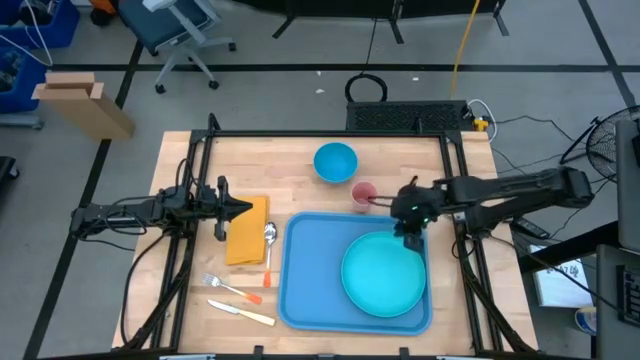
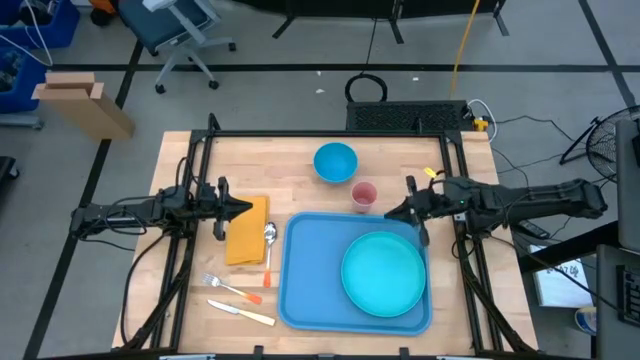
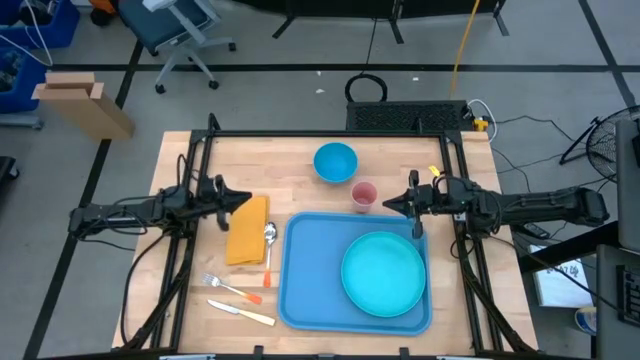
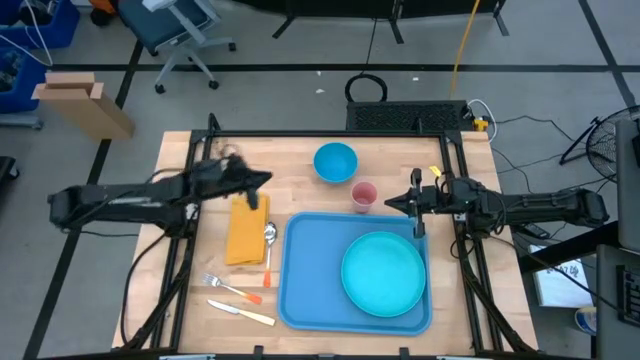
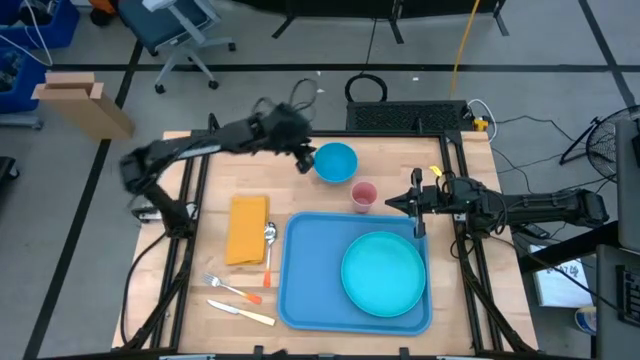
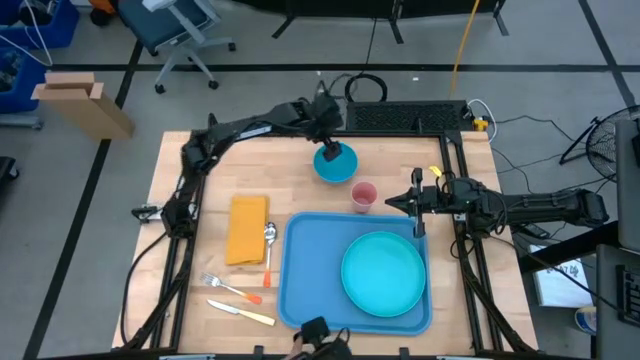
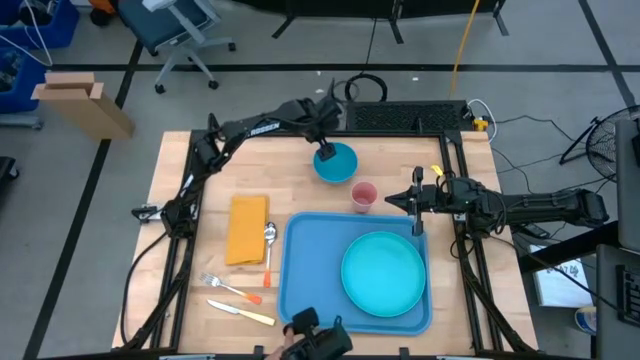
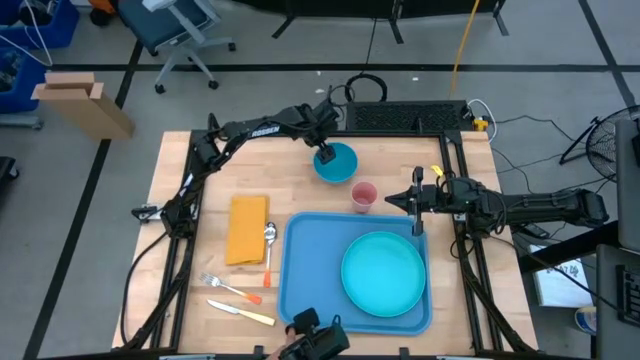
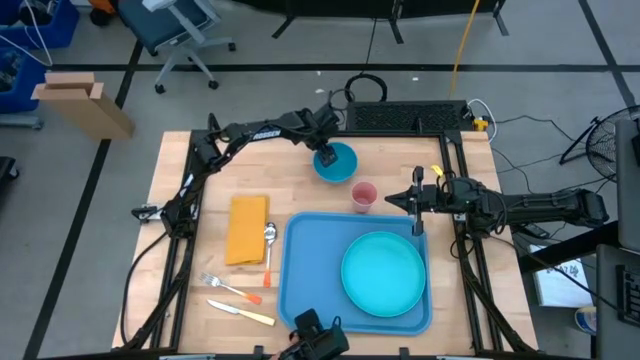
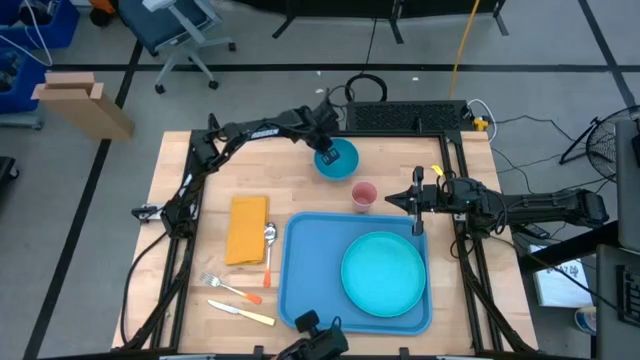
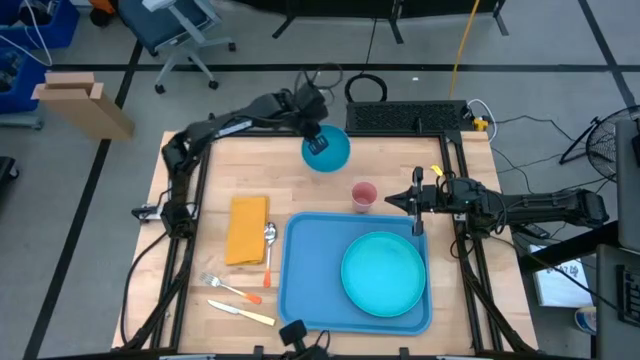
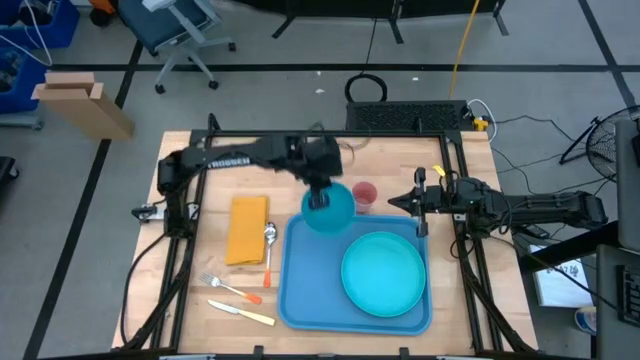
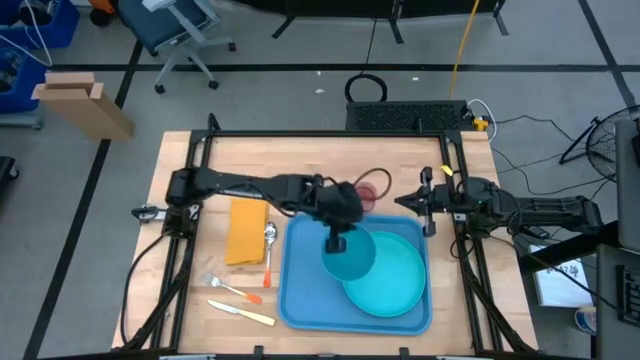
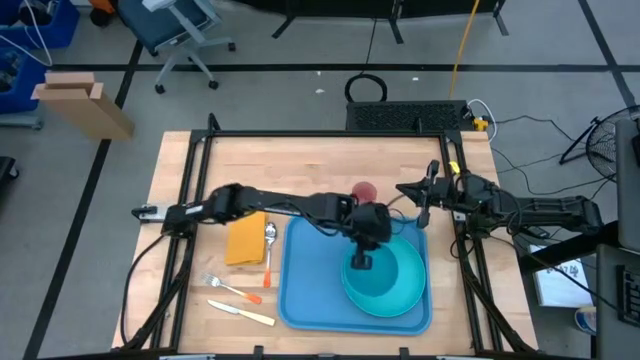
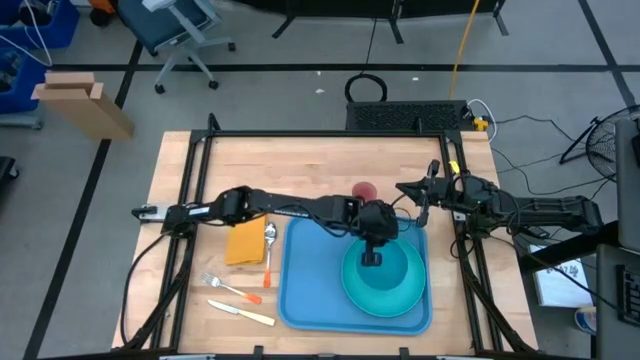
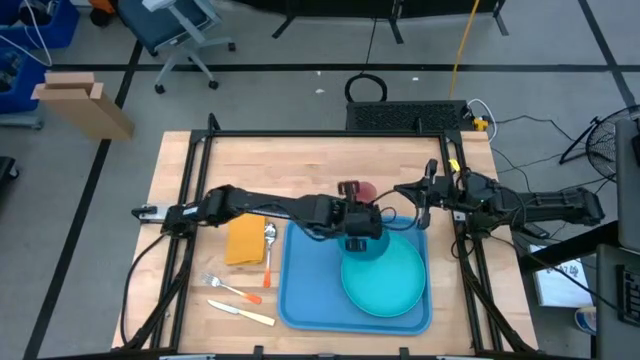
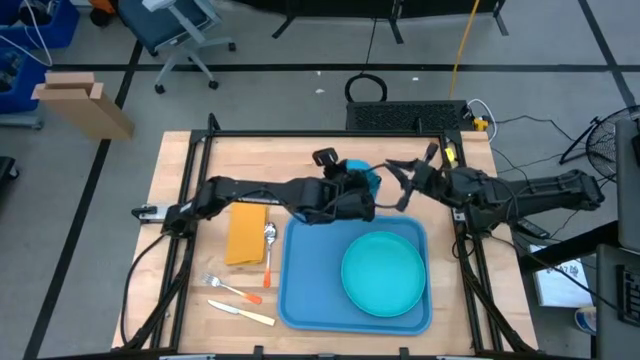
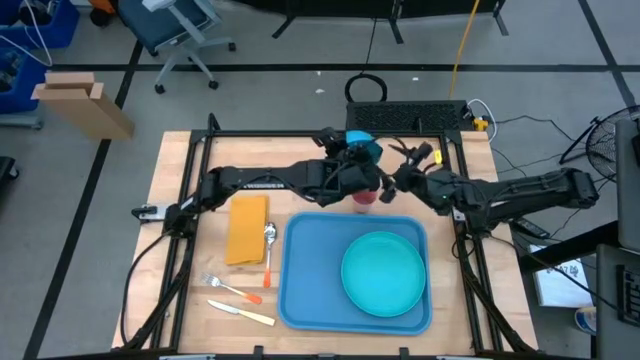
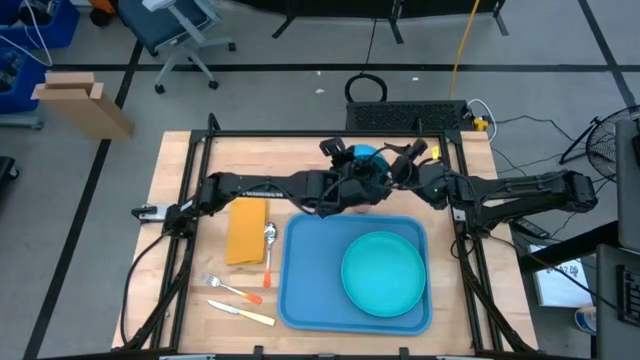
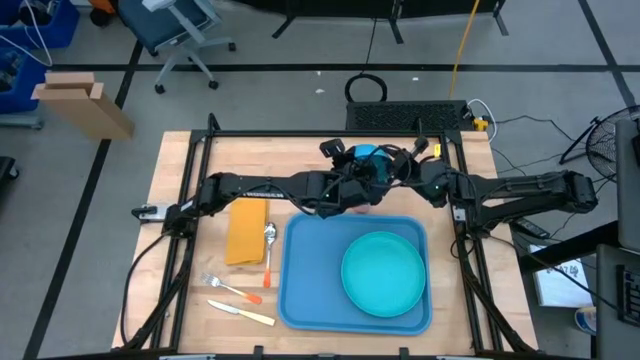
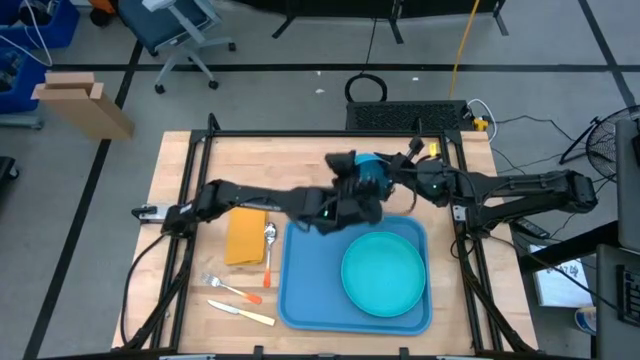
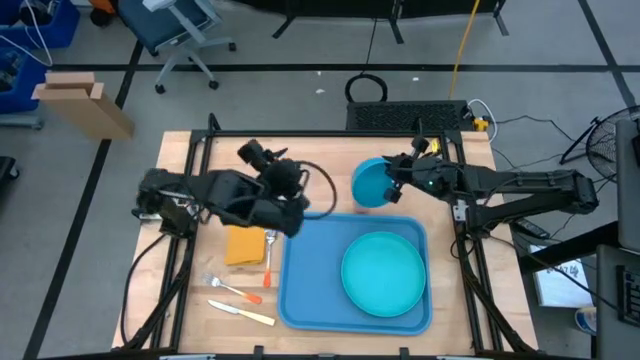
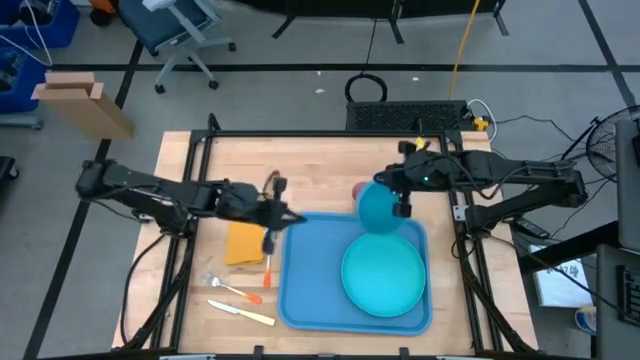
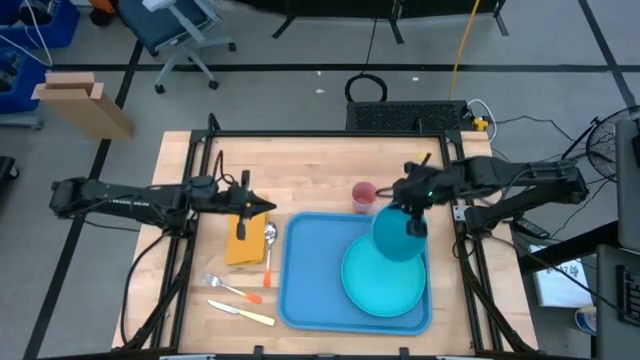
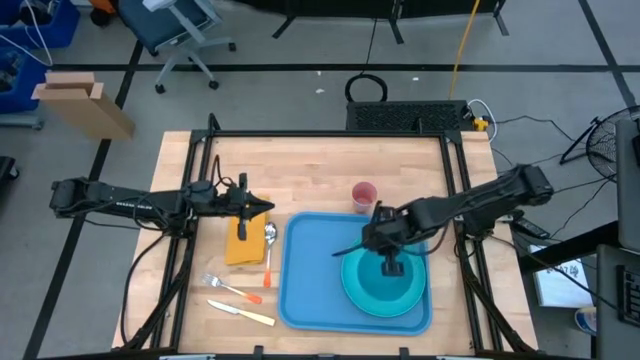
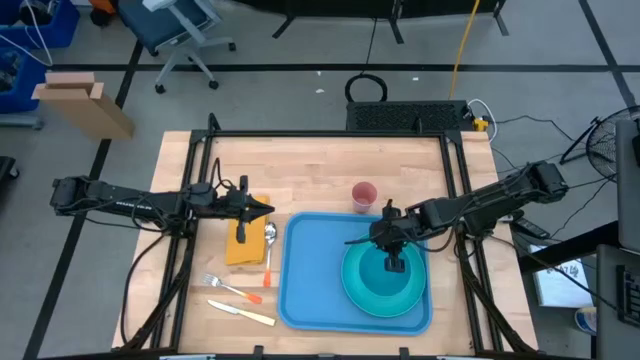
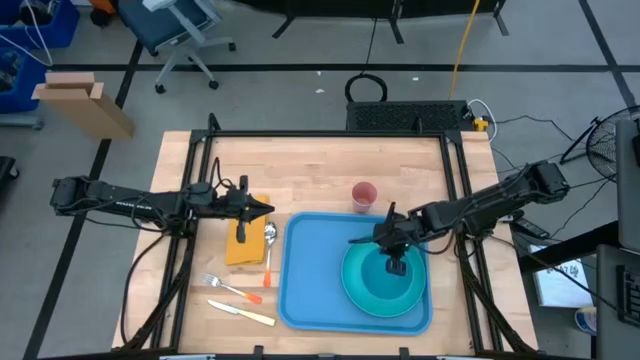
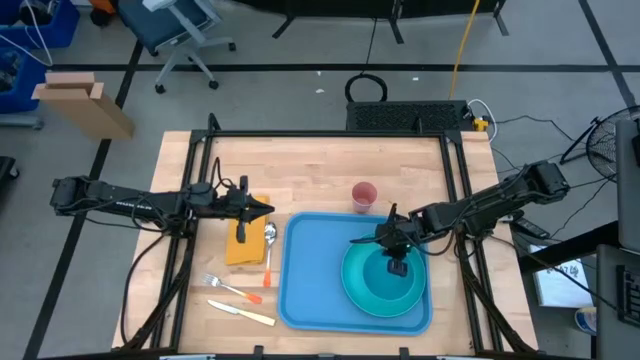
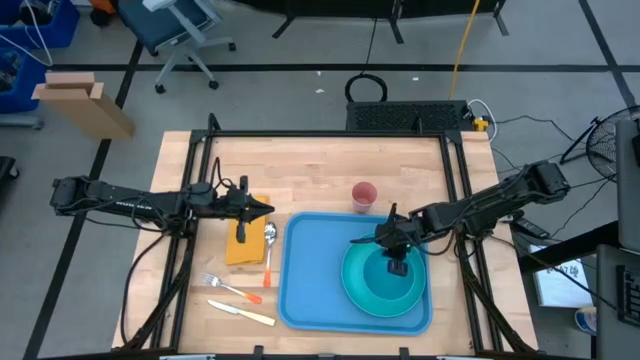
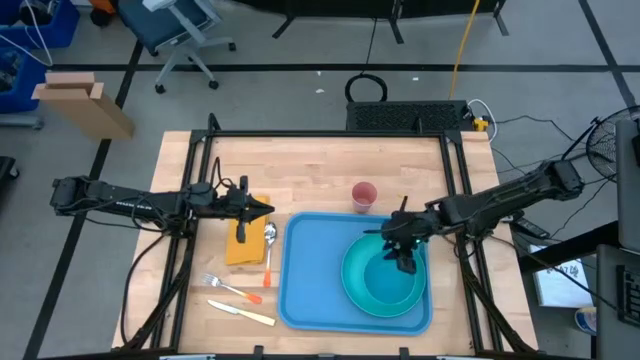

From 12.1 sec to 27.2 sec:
Task: Set up tray
Put the light blue bowl on the light green plate

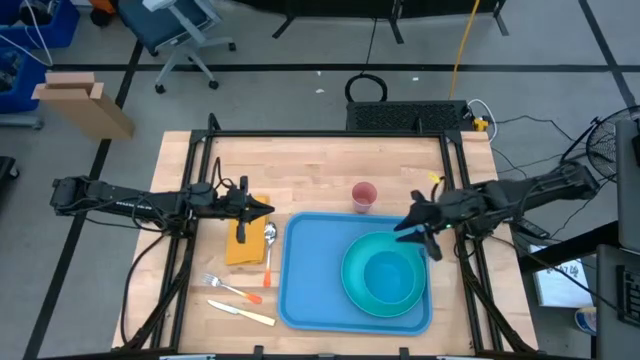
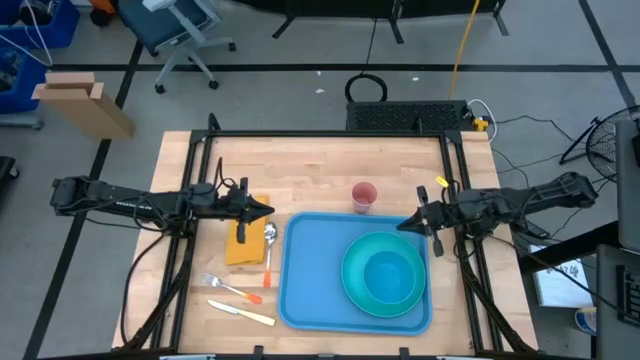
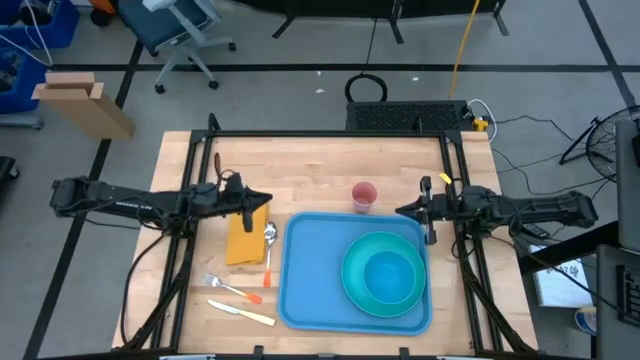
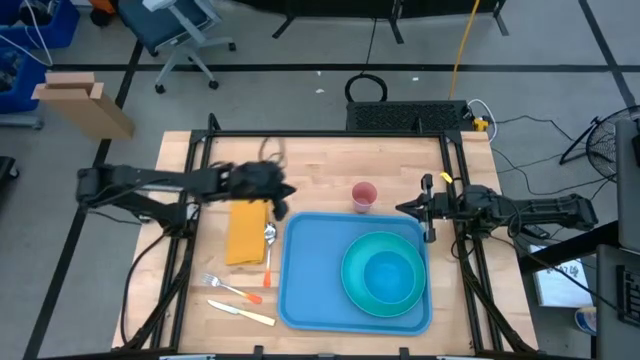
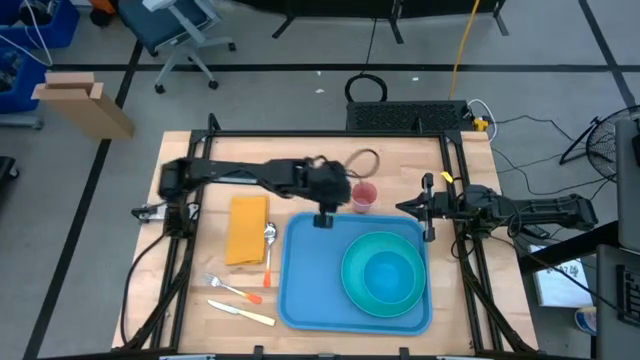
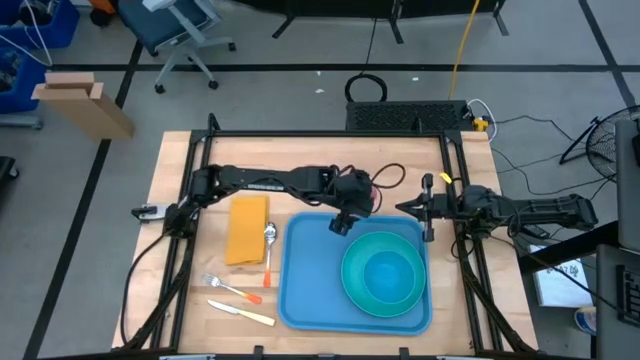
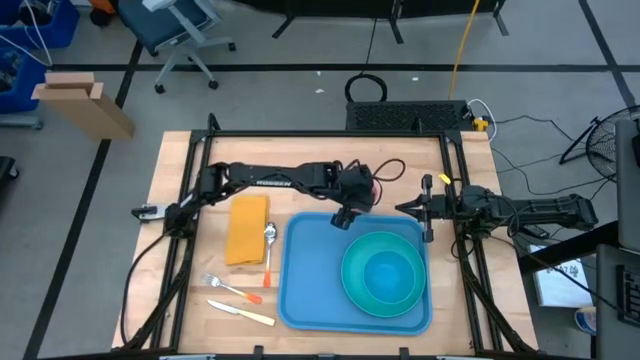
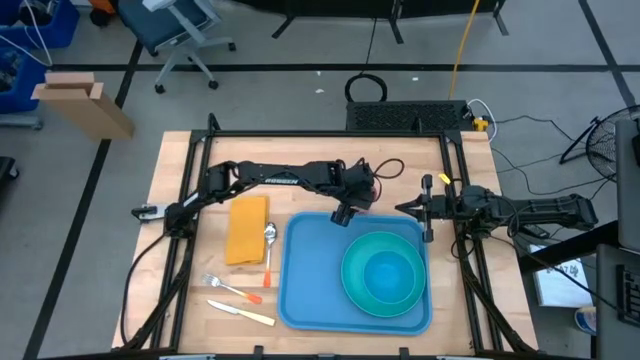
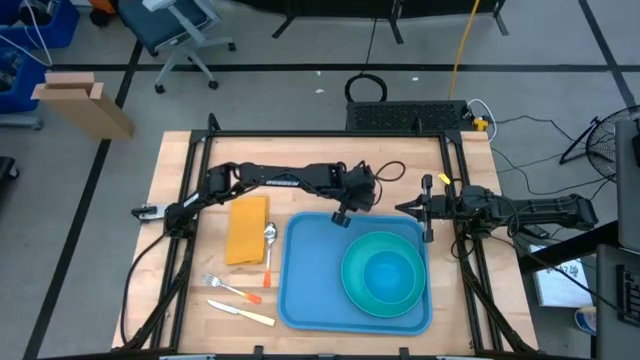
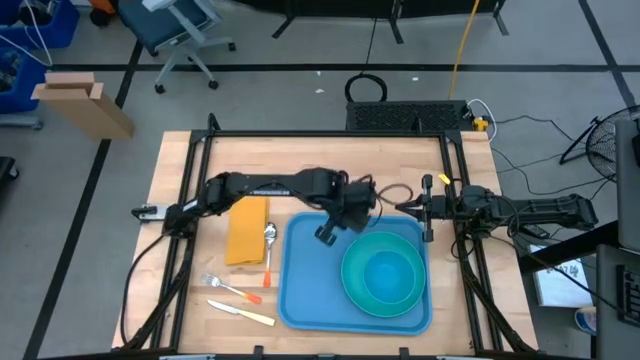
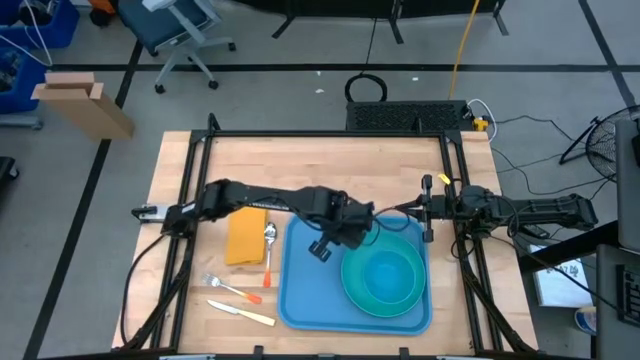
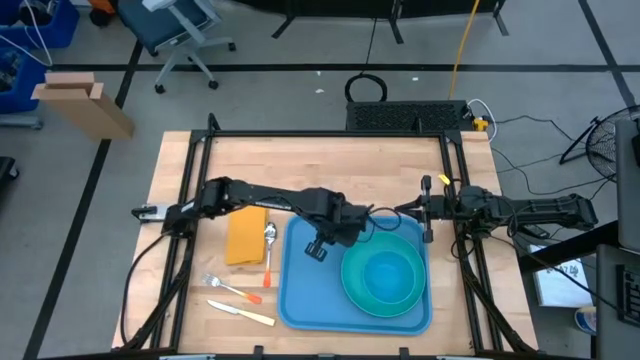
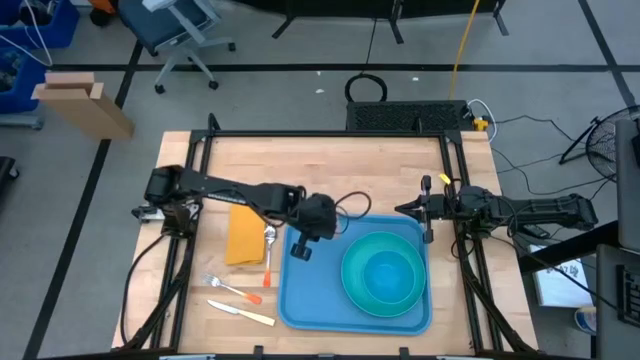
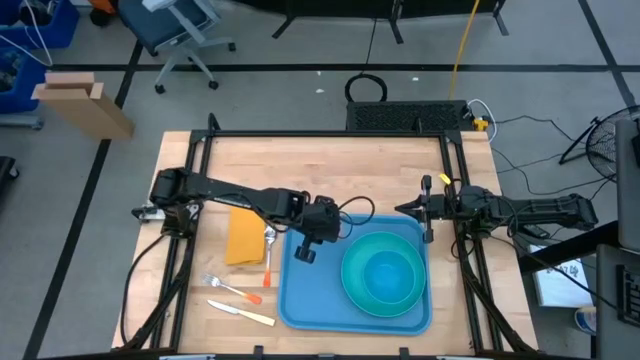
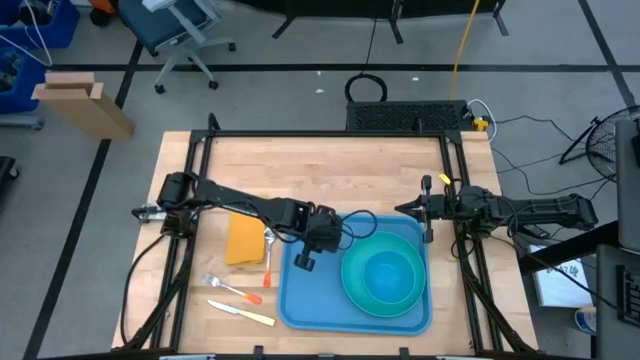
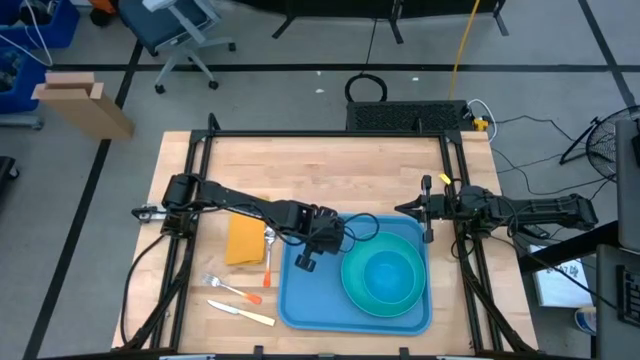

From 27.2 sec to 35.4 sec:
Put the light orange cup to the top left of the green plate on the light blue tray
